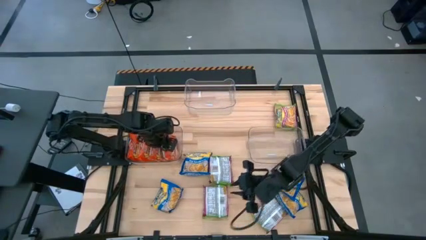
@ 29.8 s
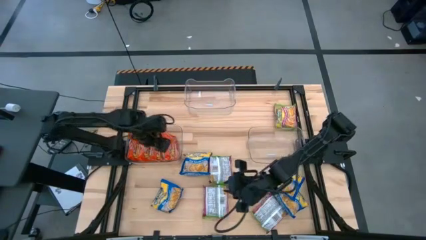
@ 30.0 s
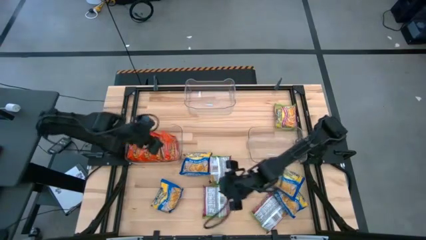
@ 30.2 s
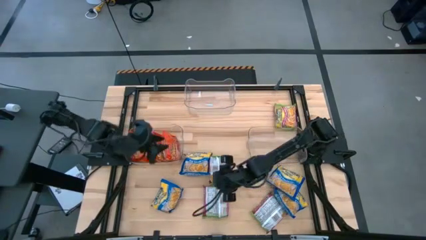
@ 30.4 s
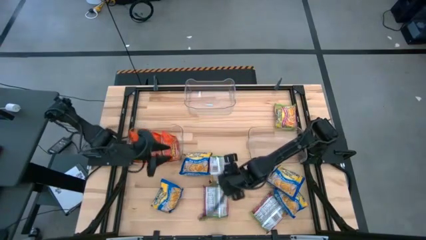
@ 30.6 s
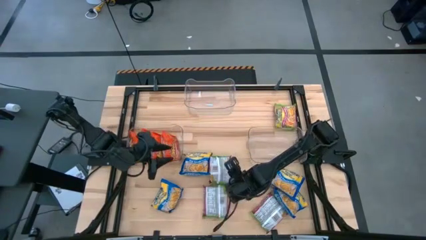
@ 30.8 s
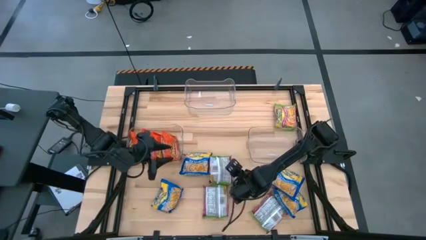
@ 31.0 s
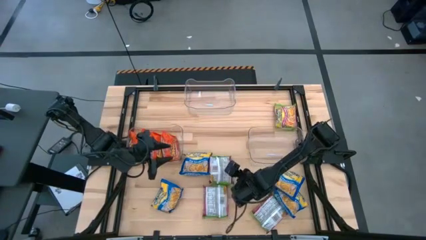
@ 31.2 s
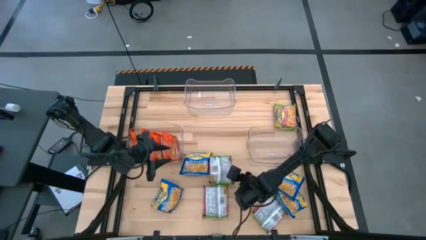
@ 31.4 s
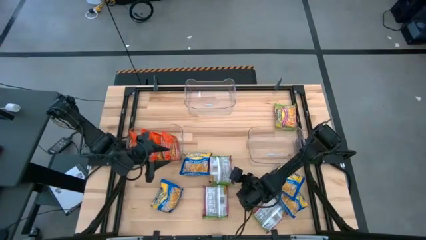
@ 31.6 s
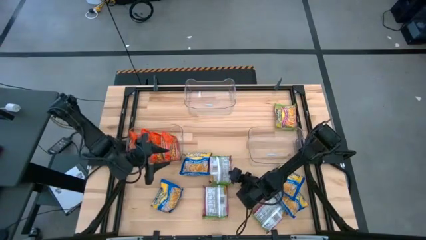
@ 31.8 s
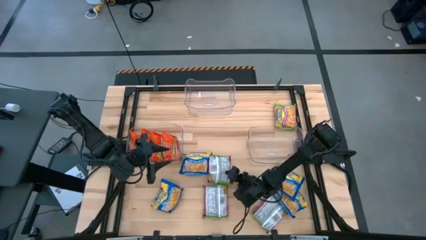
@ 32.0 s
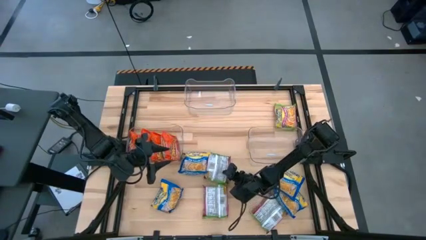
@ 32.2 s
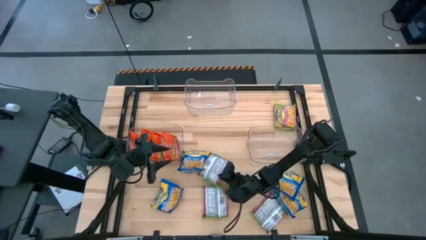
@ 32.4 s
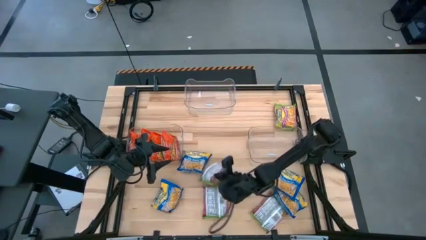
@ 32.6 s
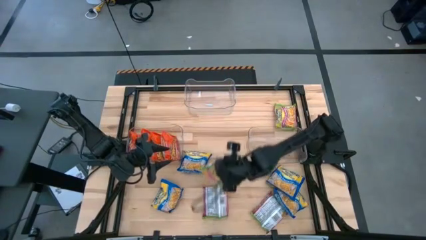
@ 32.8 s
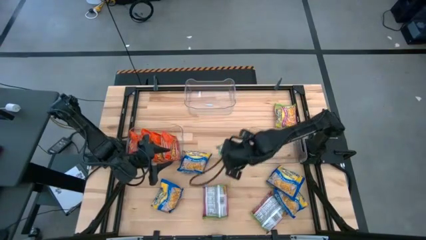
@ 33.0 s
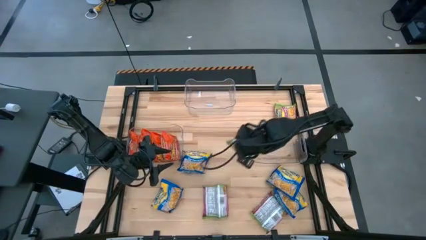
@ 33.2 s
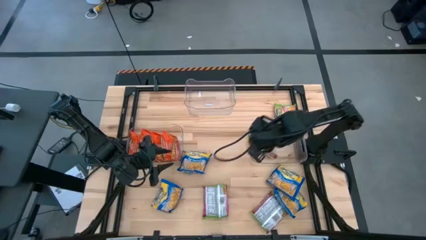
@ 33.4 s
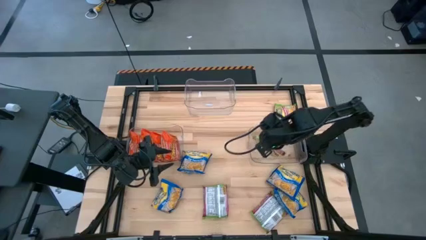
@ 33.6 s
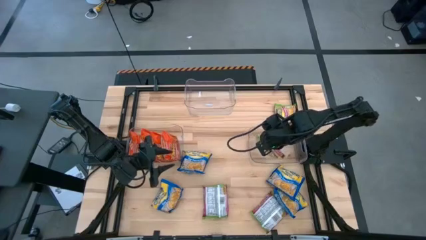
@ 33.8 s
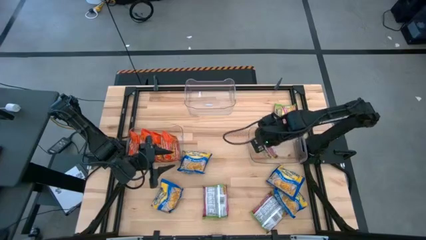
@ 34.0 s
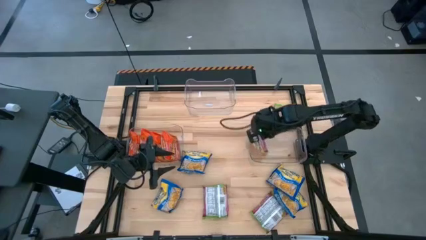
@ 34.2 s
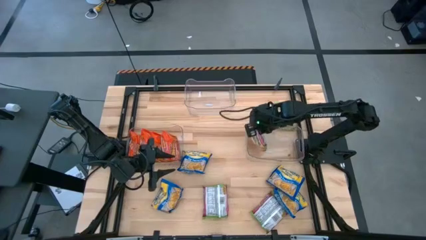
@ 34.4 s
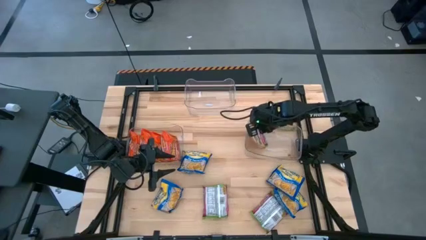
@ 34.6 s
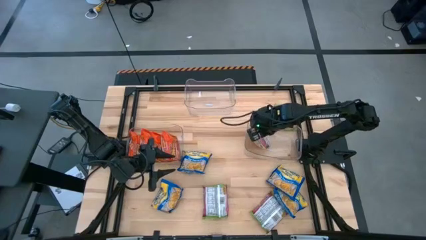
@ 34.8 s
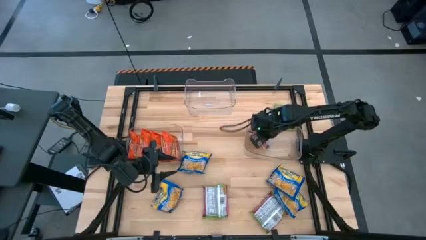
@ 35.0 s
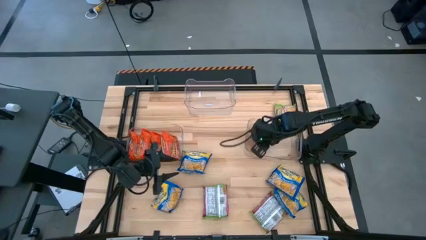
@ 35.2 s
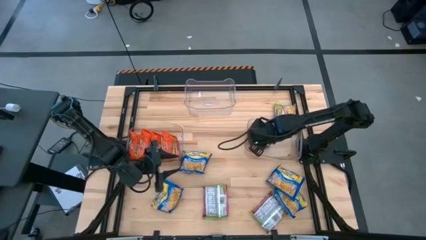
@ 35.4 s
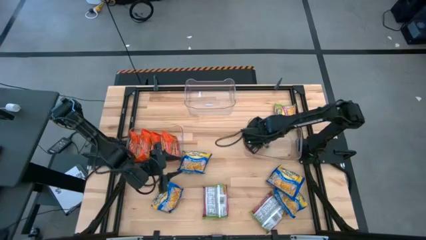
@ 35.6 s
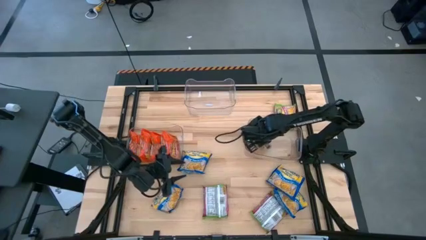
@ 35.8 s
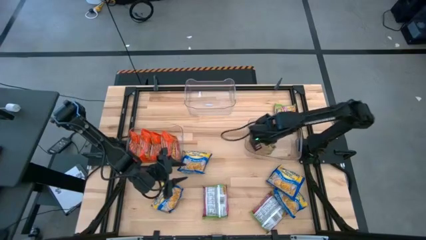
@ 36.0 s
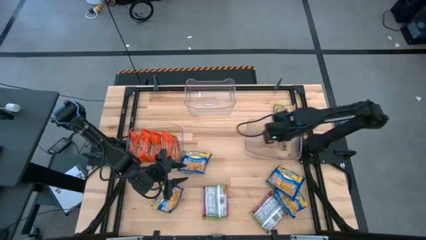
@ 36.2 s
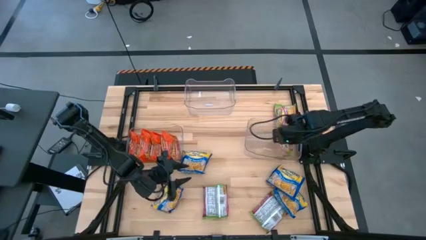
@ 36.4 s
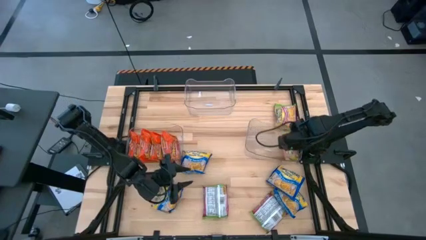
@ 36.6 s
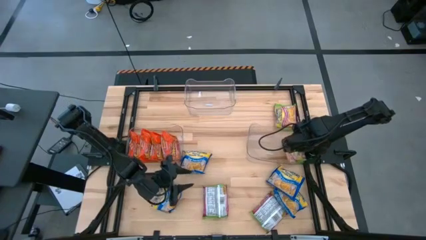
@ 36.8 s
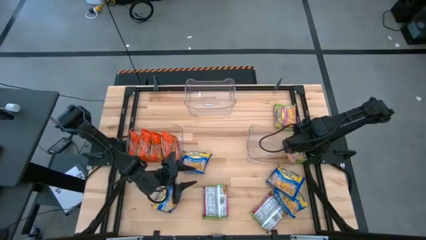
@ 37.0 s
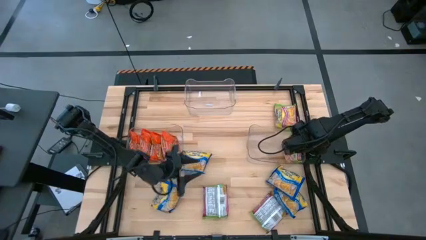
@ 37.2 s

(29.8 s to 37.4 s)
Task: Sort Maruchan noodles
Put the green noodle from the middle into the middle right transparent bin

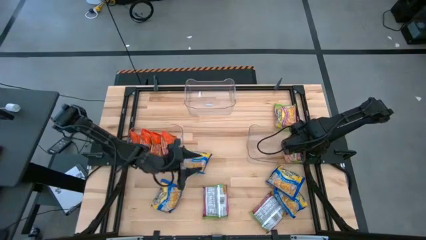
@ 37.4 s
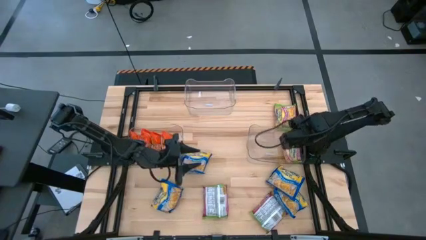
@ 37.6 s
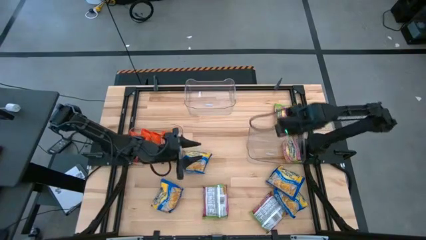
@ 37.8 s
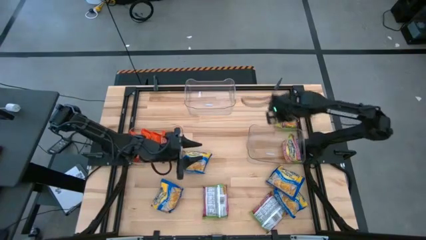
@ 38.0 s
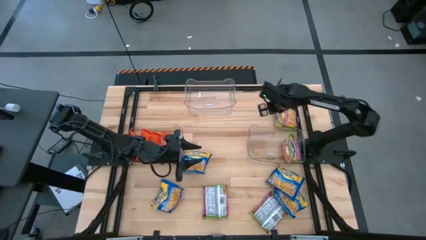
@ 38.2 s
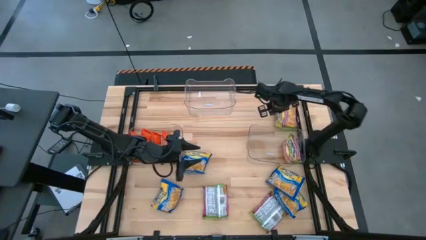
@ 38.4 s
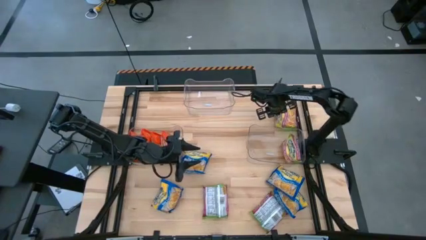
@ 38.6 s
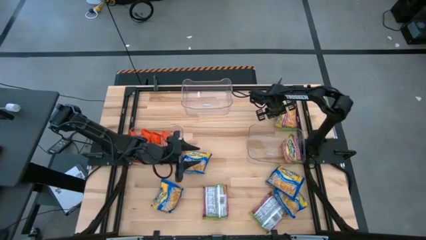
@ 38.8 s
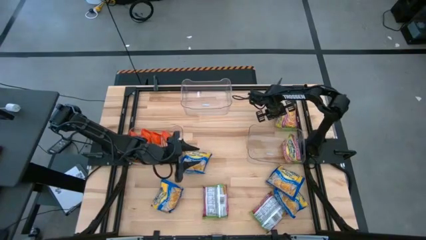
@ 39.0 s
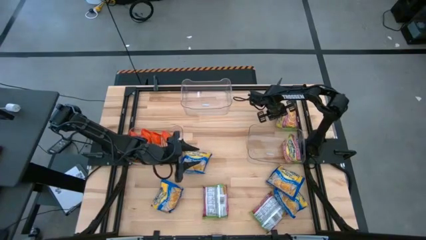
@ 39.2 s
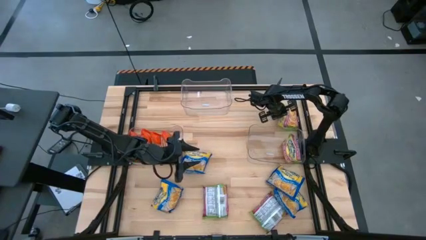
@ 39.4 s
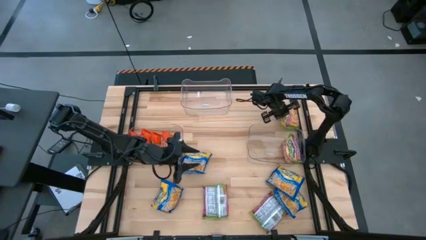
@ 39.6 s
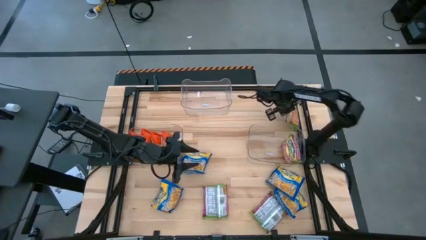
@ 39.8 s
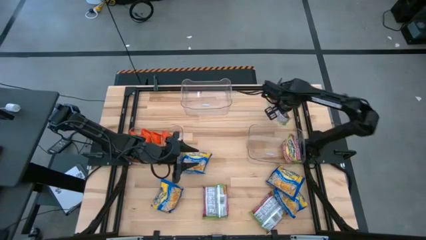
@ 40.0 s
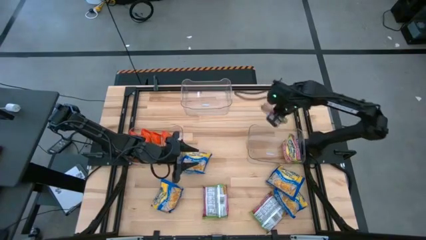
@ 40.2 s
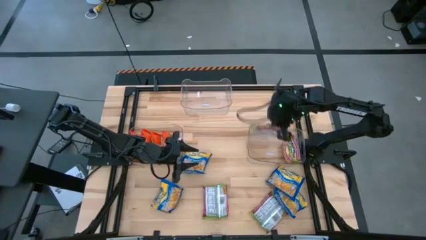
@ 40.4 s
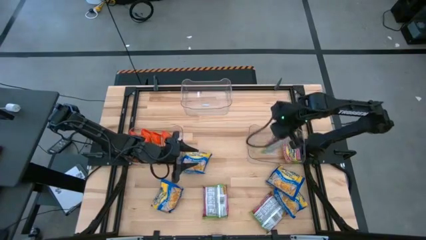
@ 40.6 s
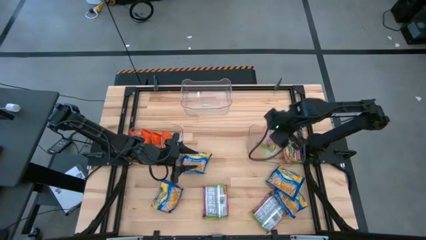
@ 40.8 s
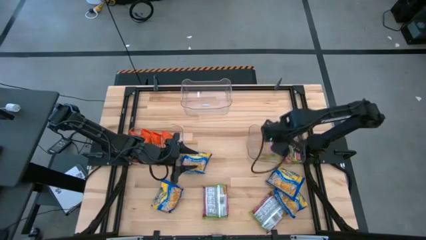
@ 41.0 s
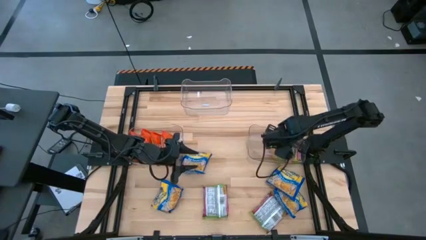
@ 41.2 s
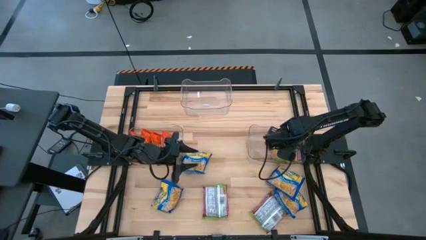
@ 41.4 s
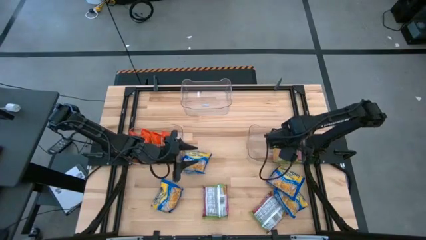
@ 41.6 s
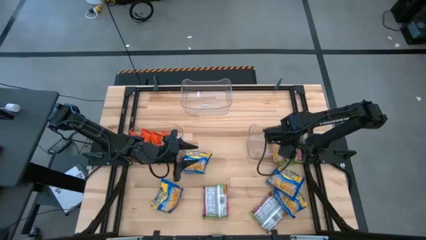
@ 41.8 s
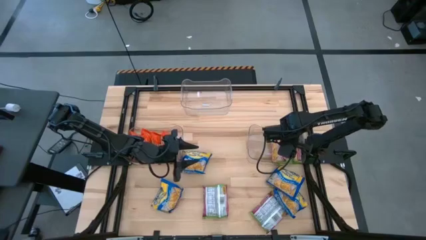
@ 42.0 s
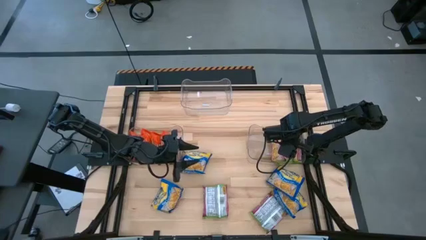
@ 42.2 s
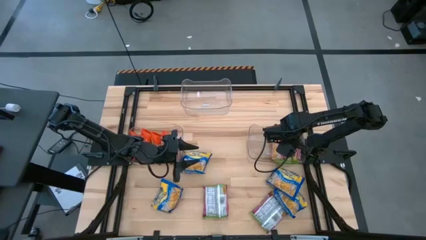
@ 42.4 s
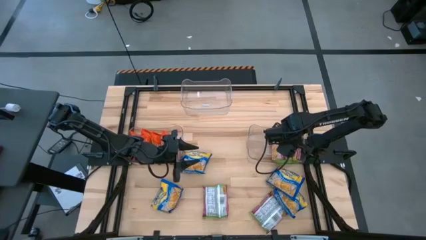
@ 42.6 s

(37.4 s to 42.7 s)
Put the green noodle from the top into the middle right transparent bin

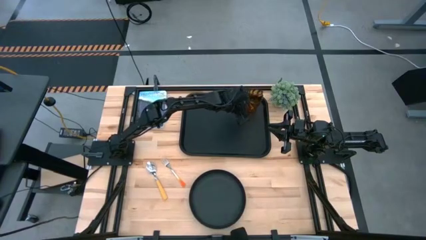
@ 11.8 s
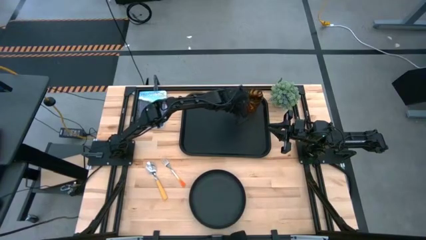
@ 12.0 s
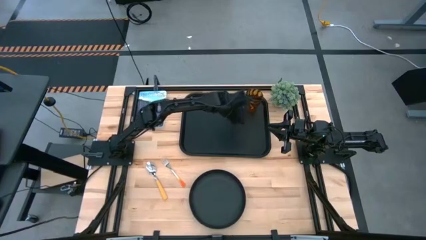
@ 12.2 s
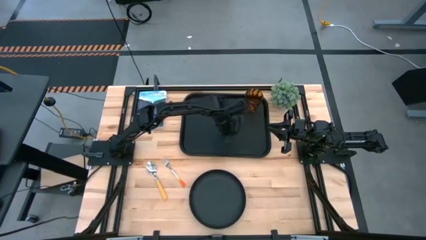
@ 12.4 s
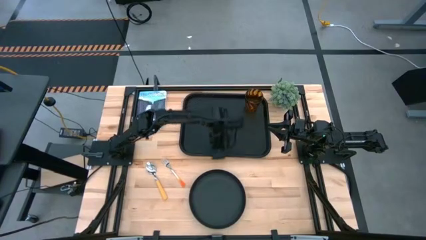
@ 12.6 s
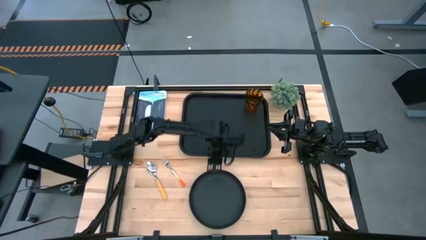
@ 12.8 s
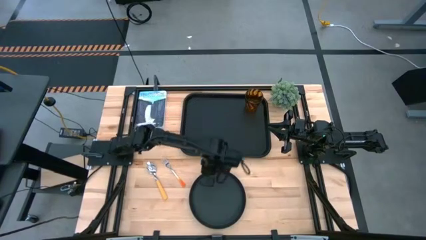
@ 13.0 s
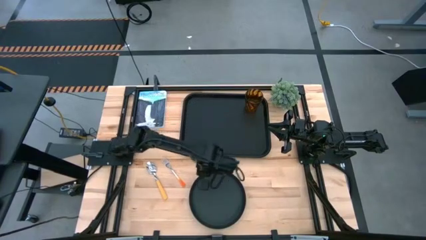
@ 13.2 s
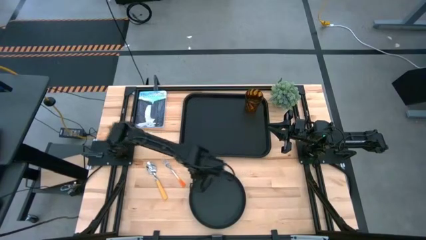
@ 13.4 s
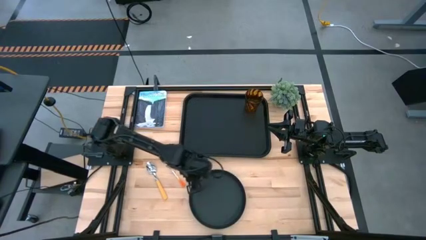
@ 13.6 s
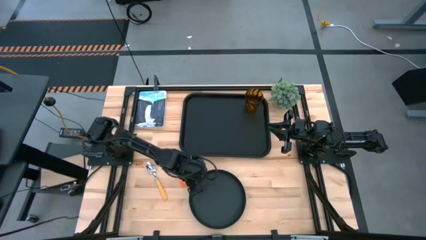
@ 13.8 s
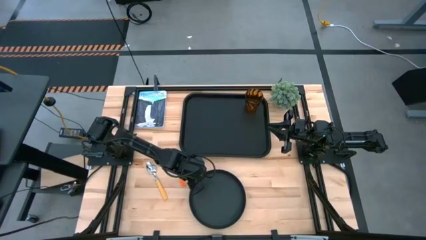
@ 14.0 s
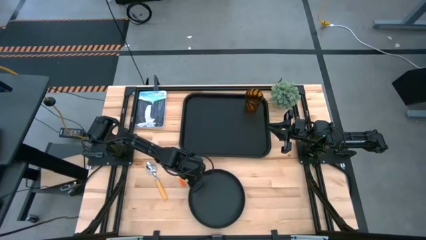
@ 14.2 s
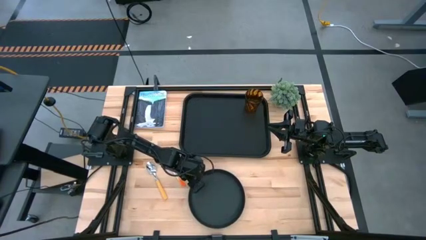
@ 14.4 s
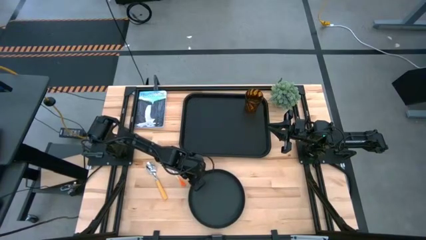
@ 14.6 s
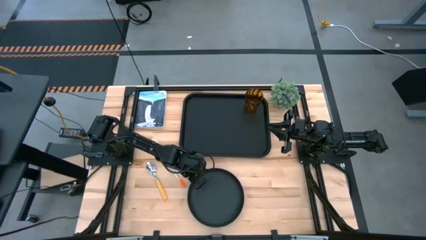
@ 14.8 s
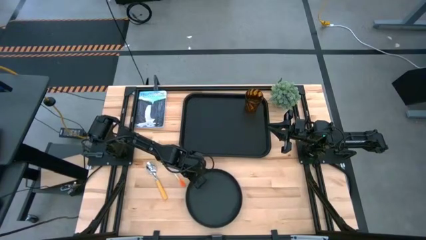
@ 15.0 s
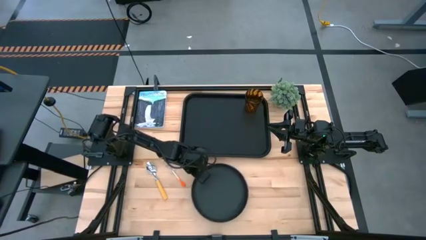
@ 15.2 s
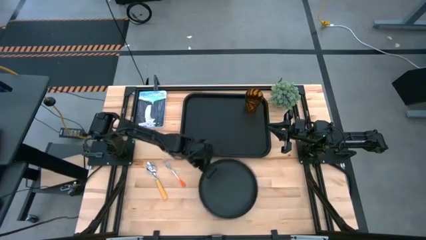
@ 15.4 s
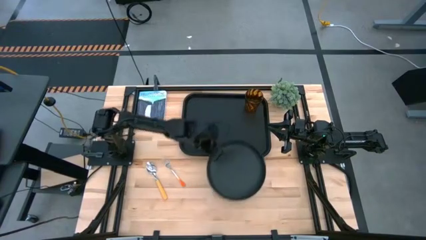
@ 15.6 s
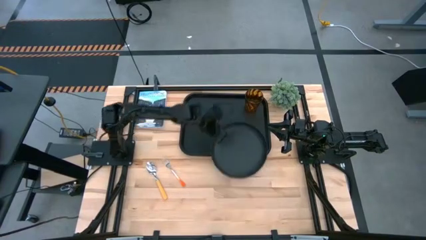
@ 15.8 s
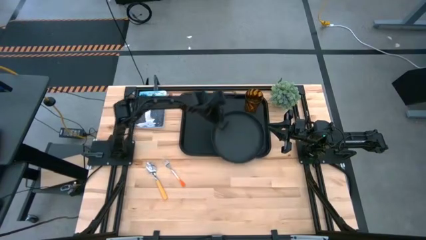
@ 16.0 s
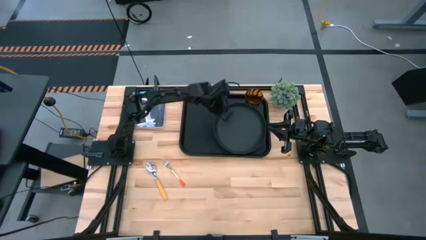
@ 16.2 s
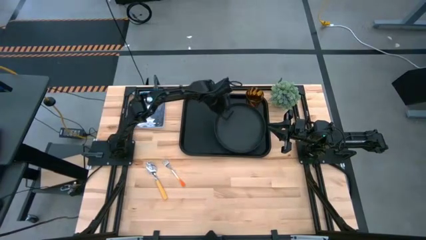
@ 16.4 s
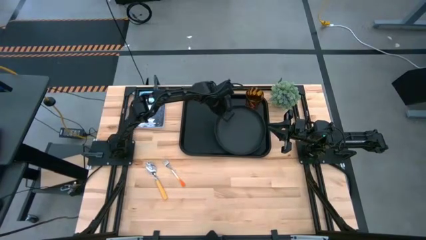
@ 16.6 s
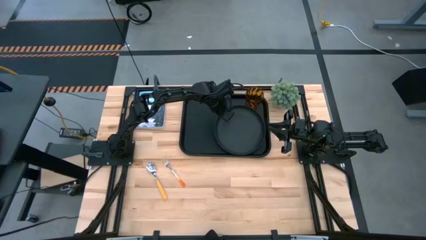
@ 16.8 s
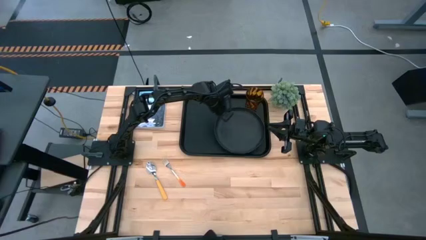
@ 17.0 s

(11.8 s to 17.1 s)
Task: Pick and place plate/cup/fork/spoon on tray
Put the black plate on the black food tray
